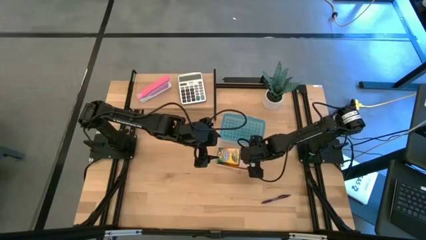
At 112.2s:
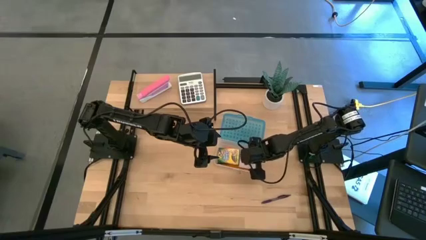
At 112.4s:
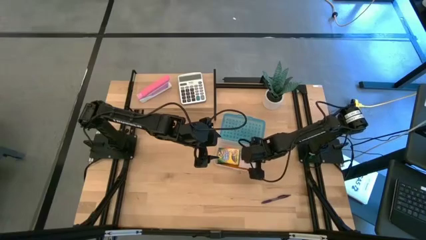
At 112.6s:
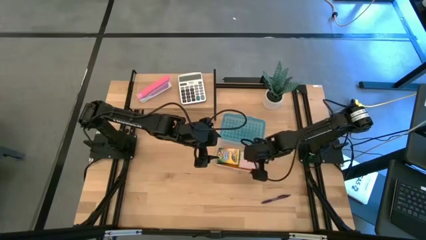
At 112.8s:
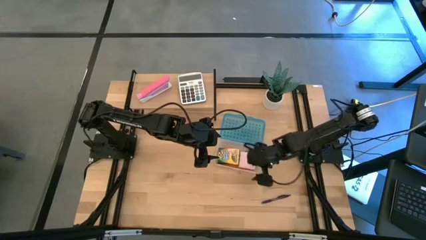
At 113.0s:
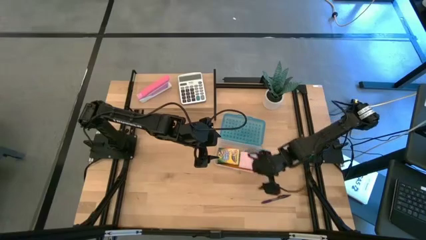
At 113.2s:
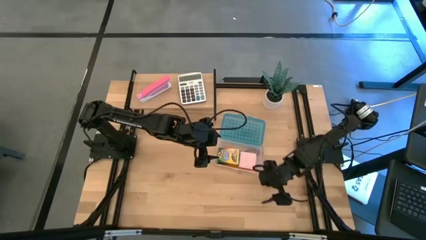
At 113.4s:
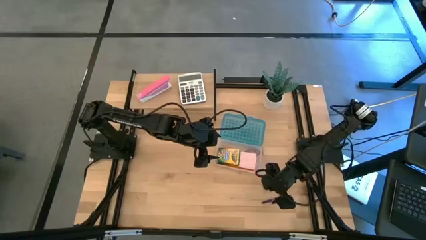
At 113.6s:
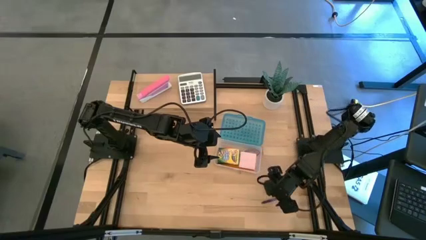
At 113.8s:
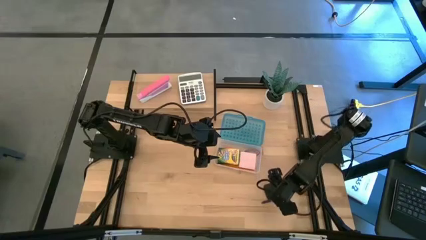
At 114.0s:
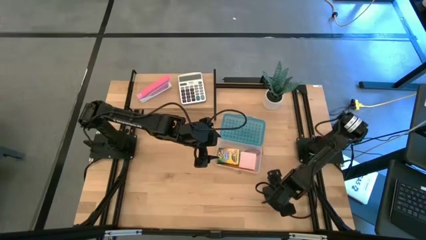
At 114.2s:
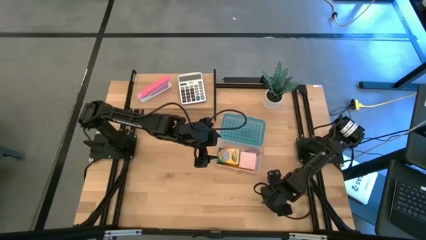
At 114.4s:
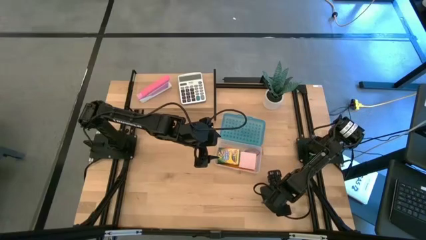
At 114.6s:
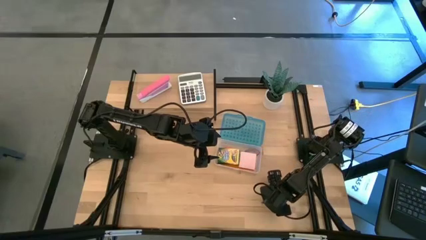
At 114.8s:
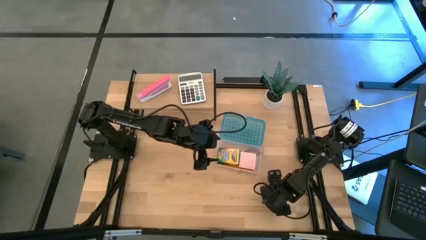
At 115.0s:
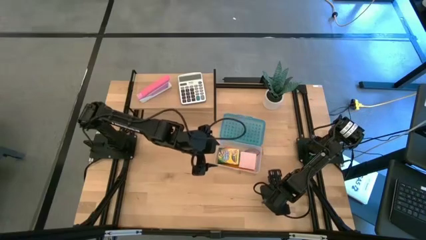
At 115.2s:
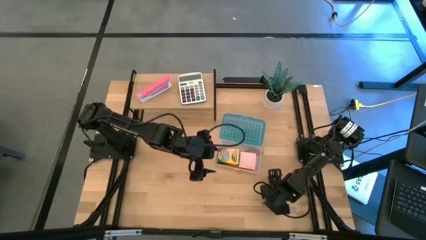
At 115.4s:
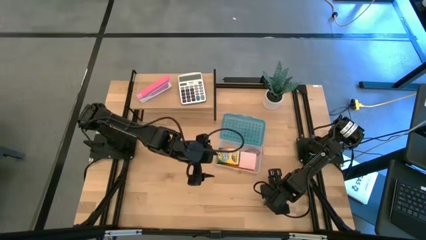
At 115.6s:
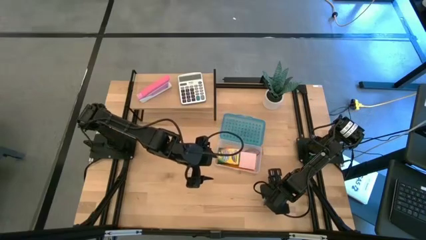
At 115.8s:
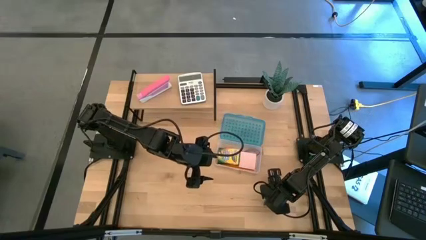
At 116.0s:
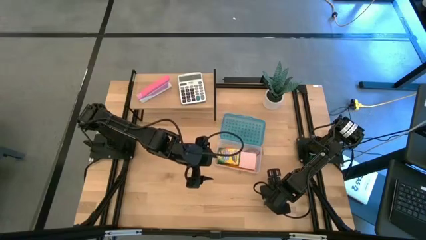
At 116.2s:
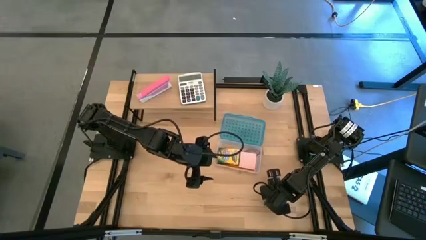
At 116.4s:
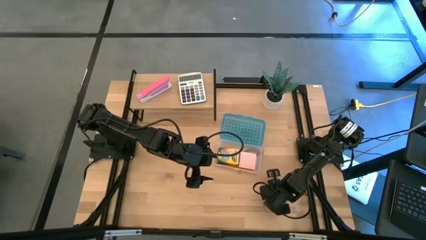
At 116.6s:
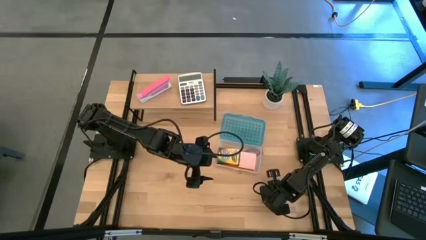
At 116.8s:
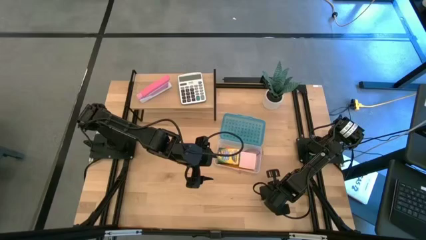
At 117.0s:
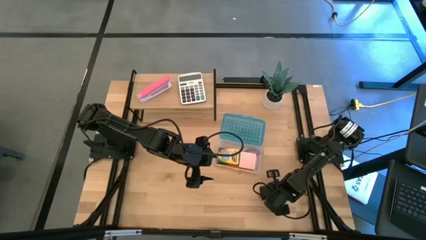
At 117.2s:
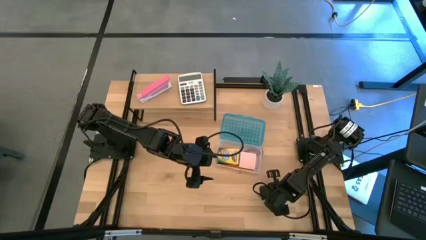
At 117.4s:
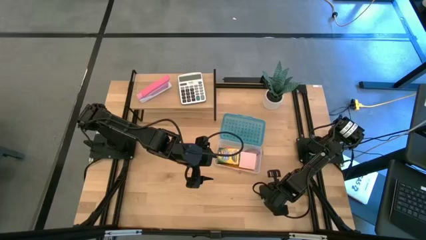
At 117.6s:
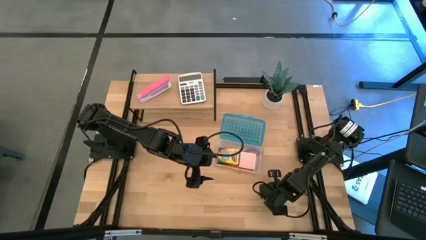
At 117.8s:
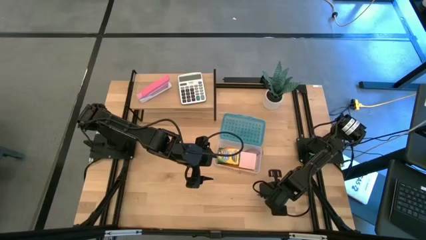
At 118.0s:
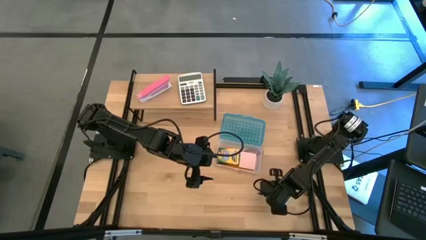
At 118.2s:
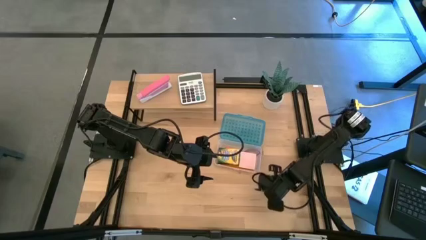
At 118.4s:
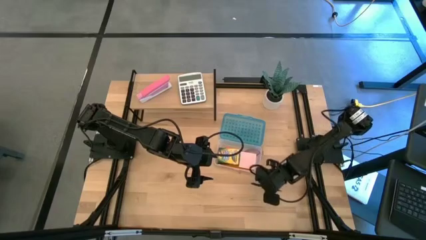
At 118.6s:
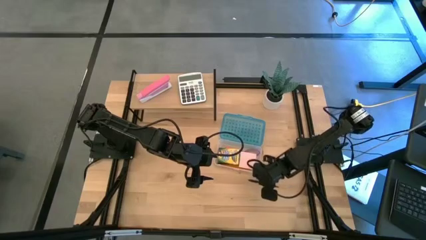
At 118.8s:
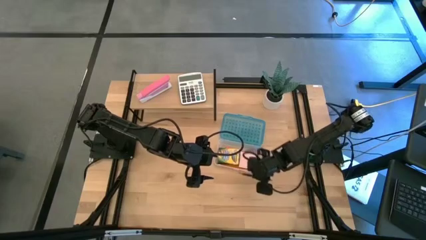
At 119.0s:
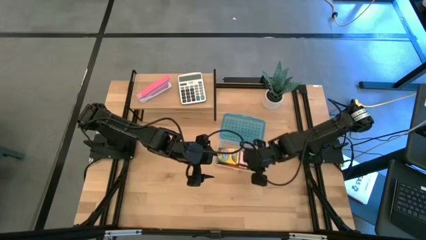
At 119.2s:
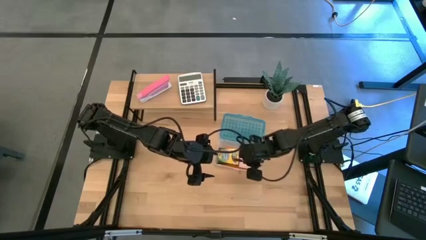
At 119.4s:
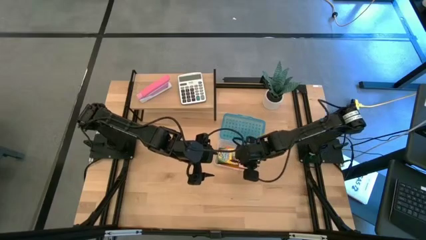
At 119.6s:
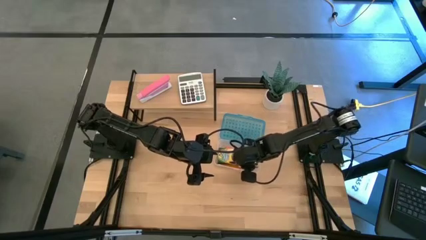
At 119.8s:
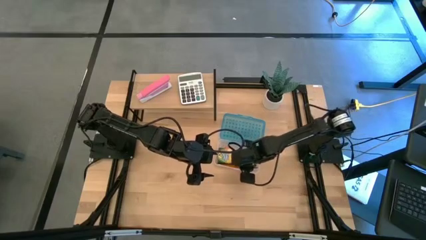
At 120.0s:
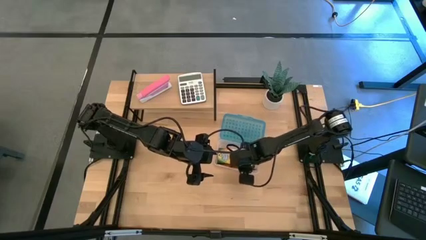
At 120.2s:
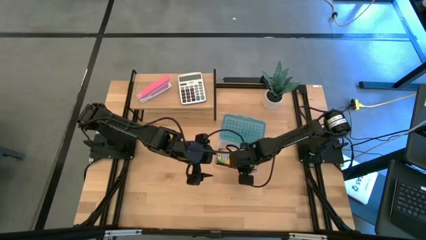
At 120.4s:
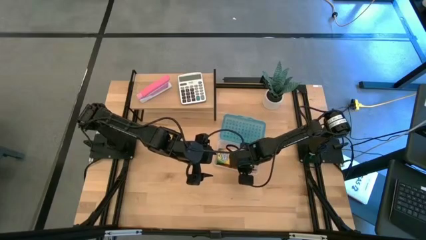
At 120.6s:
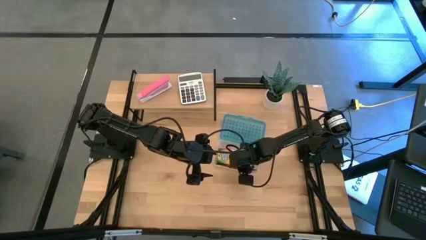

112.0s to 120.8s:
Task: Pack school essentials
Put the pen into the supply box

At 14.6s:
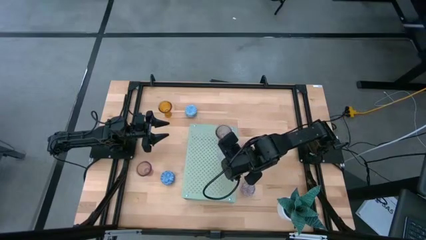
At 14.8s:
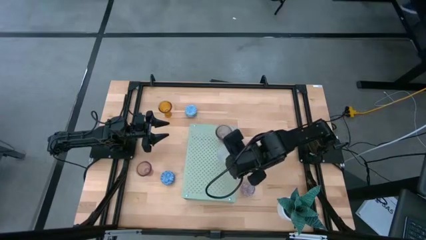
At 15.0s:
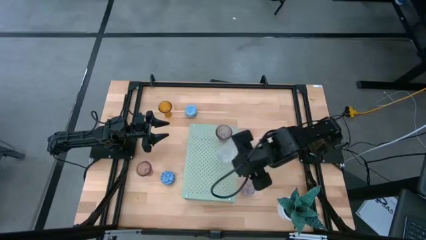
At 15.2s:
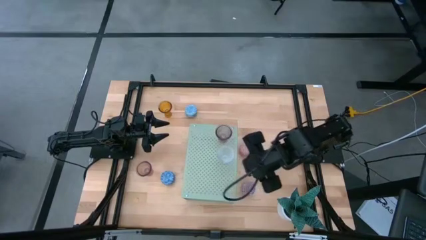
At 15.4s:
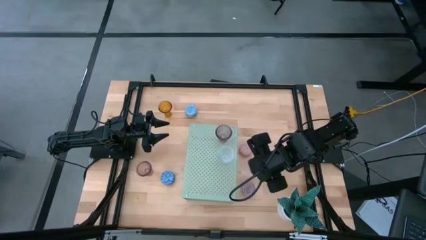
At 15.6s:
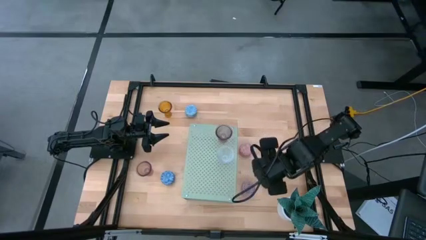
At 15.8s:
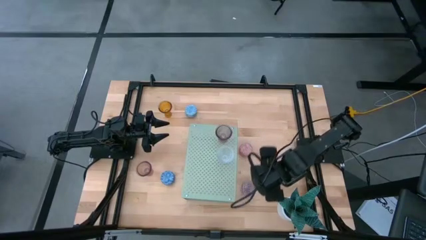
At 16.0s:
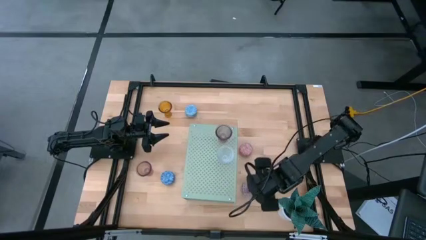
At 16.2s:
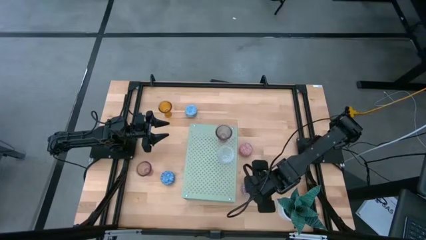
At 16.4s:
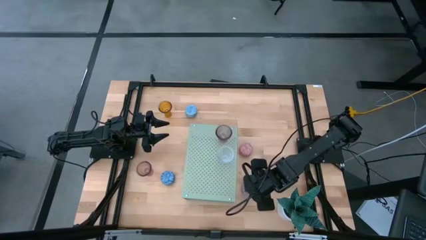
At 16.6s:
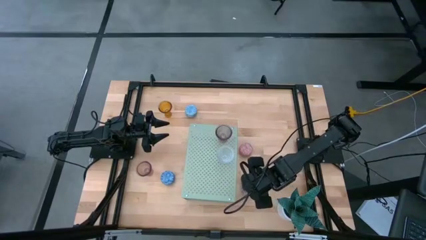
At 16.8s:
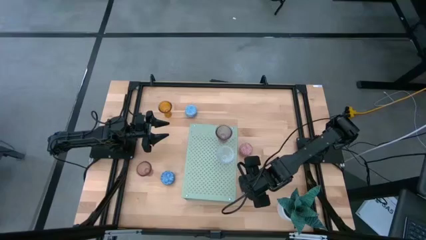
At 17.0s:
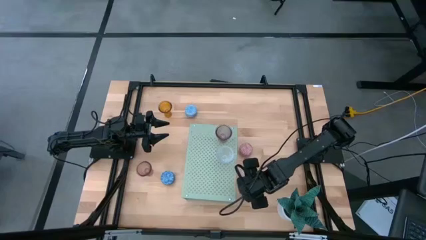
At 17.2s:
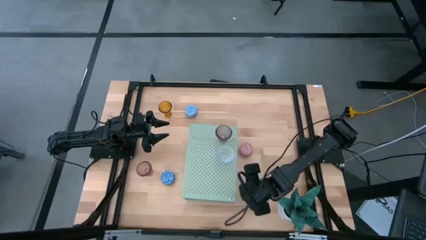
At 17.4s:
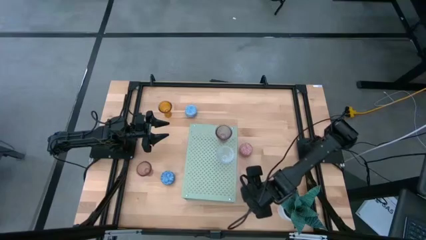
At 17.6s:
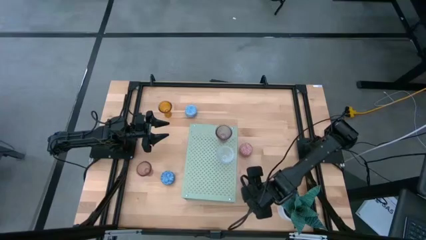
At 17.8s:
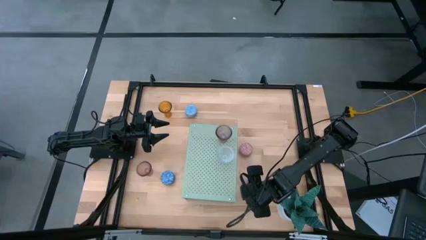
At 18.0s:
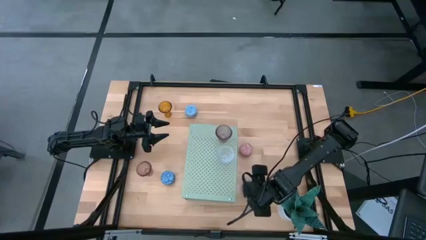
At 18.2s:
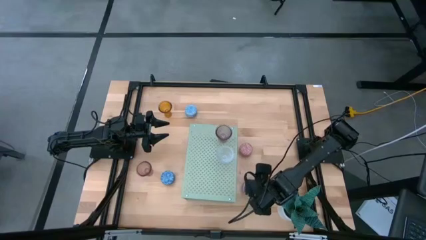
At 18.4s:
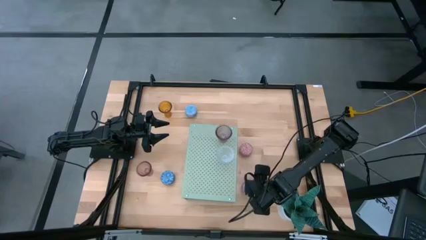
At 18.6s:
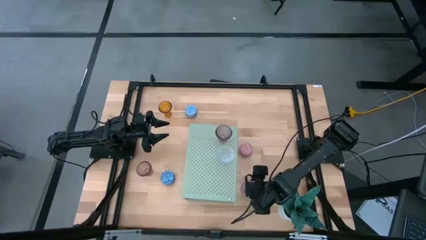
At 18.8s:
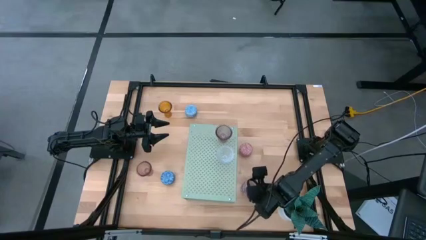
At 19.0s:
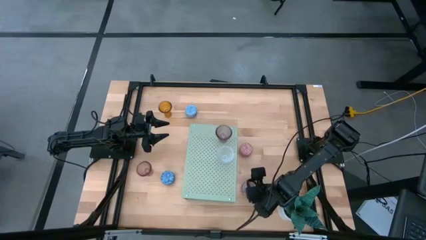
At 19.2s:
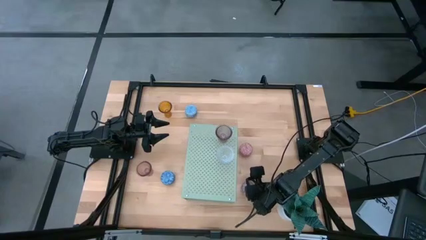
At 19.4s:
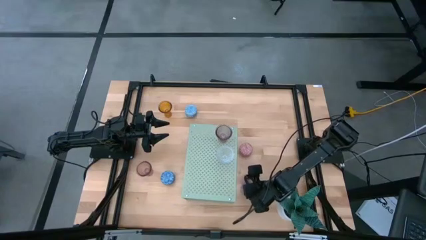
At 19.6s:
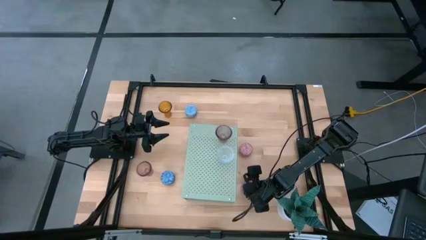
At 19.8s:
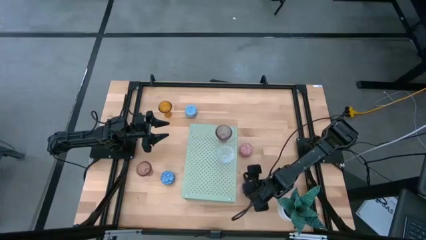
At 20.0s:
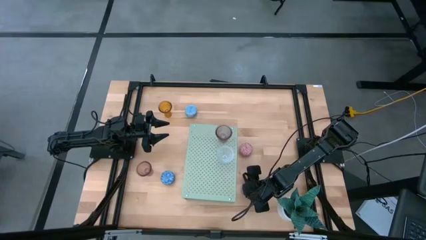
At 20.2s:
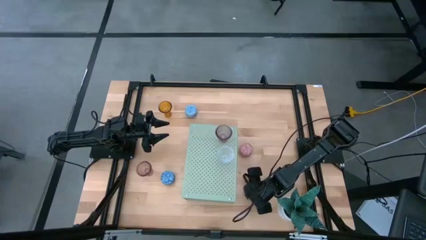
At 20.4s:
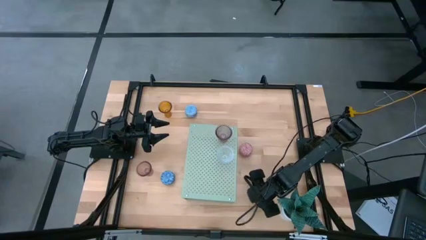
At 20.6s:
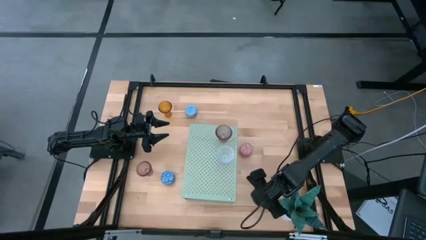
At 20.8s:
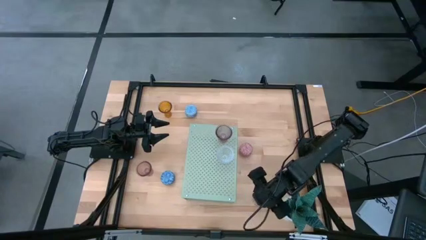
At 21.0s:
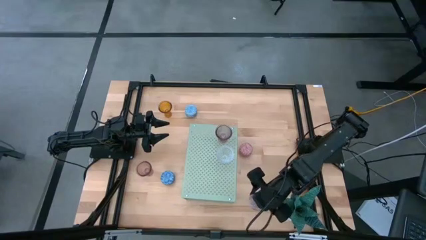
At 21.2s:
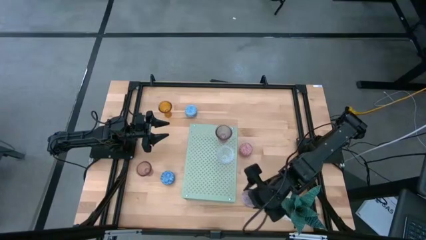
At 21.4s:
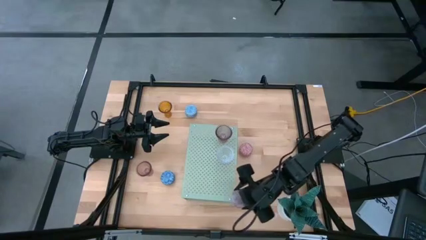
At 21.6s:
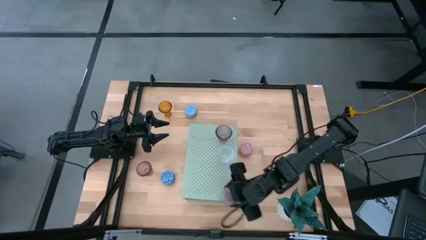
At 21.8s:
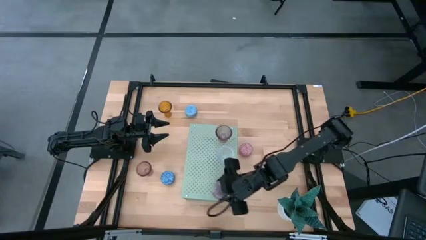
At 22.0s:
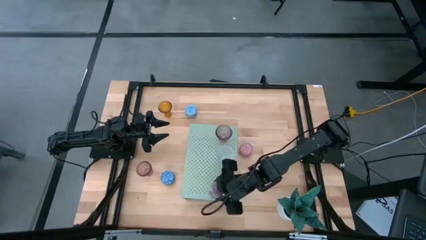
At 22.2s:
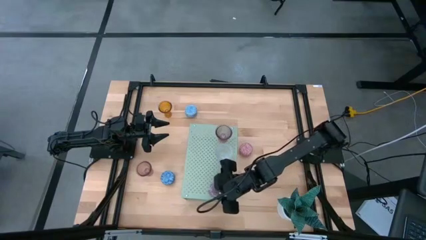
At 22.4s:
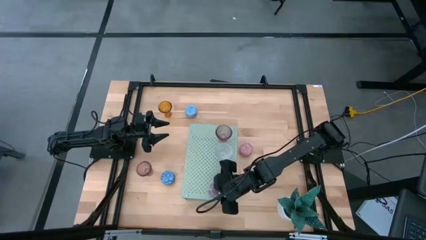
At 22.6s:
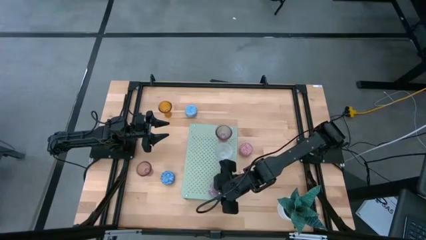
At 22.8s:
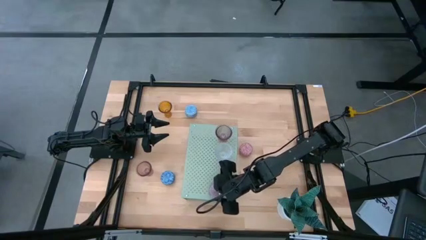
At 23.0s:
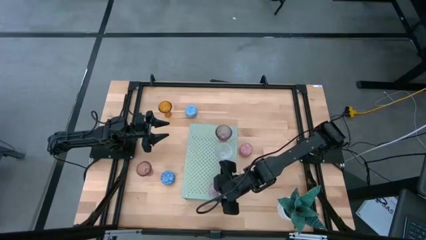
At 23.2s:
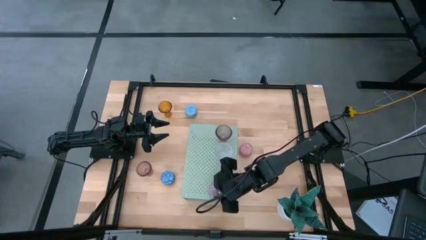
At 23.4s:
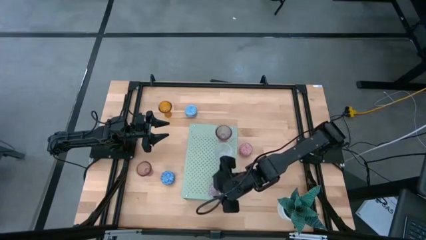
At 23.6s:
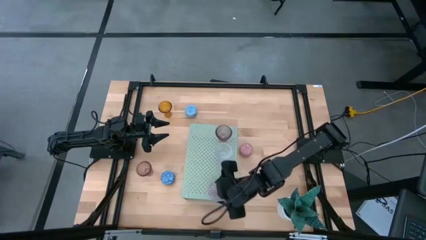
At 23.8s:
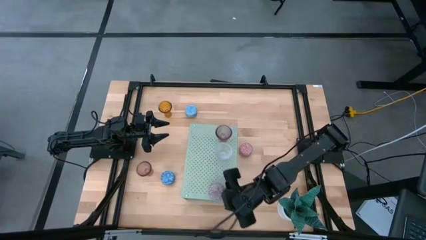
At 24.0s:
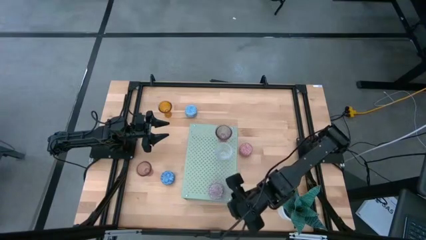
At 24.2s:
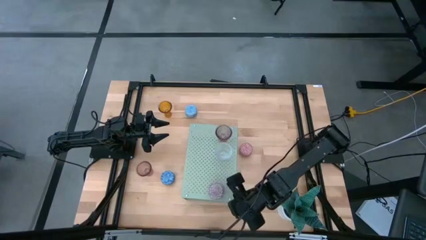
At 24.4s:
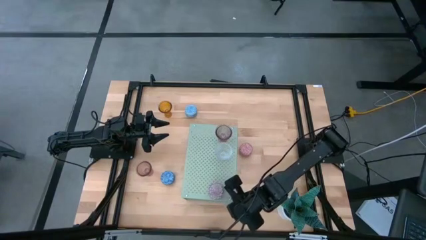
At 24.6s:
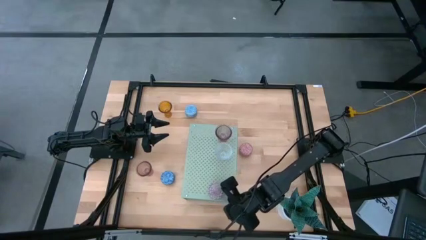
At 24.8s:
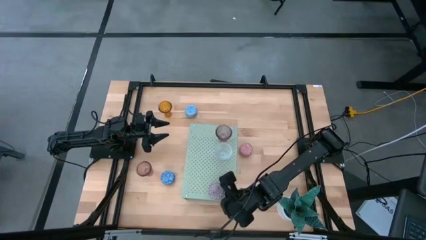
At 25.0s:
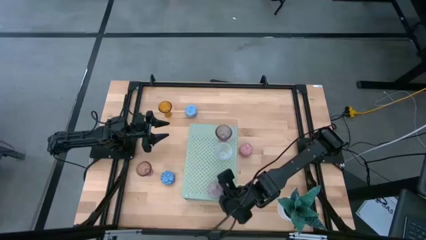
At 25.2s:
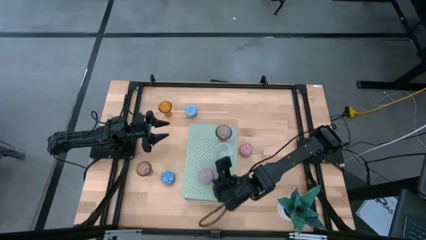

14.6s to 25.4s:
Task: Pick & Place candle stick holders
Put the dark red patterned scented candle on the shelf
